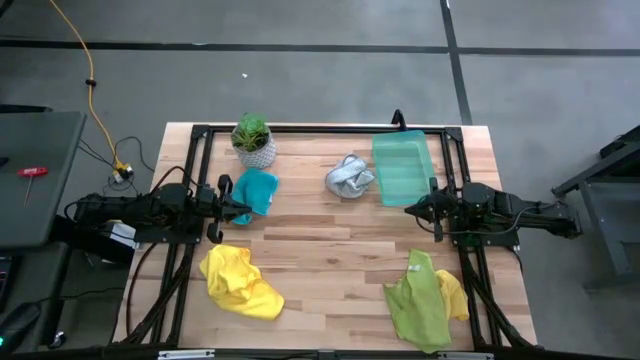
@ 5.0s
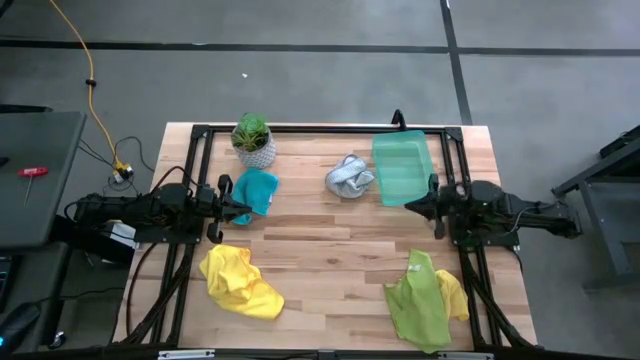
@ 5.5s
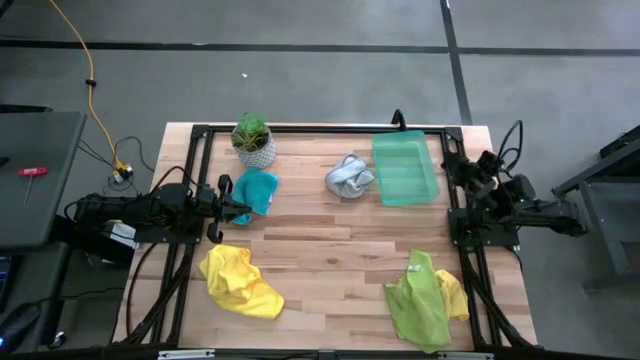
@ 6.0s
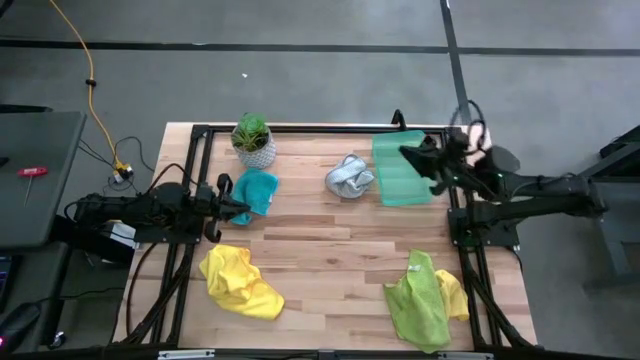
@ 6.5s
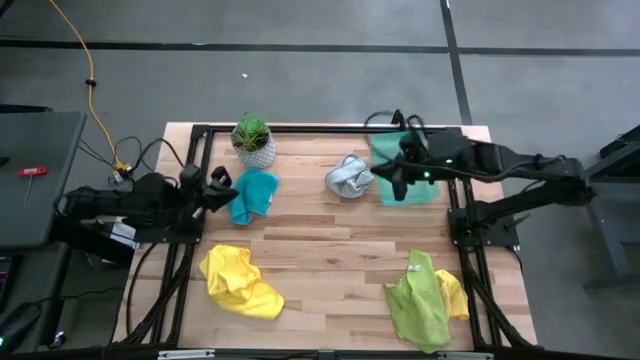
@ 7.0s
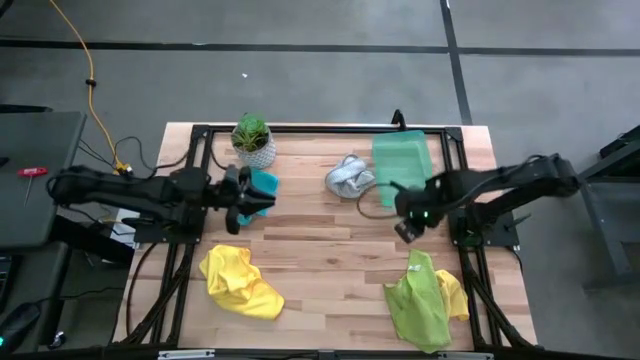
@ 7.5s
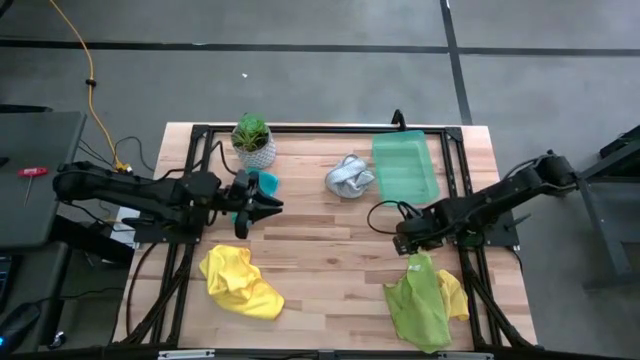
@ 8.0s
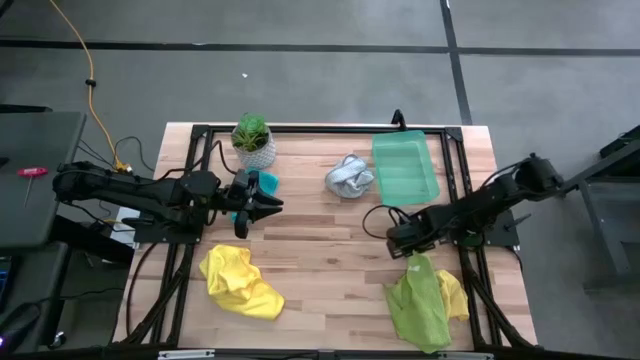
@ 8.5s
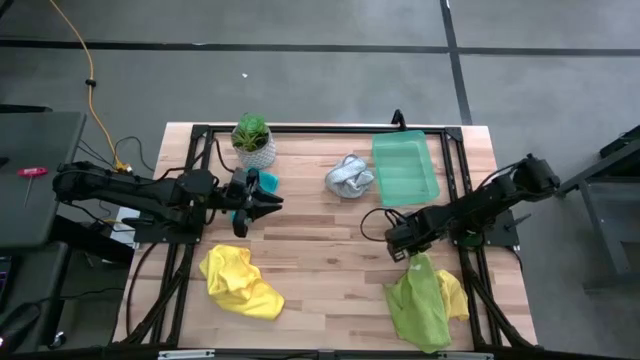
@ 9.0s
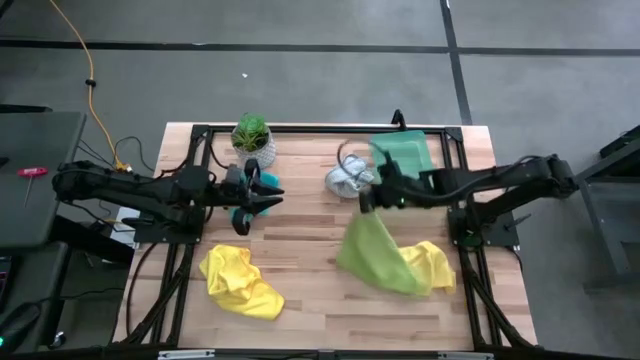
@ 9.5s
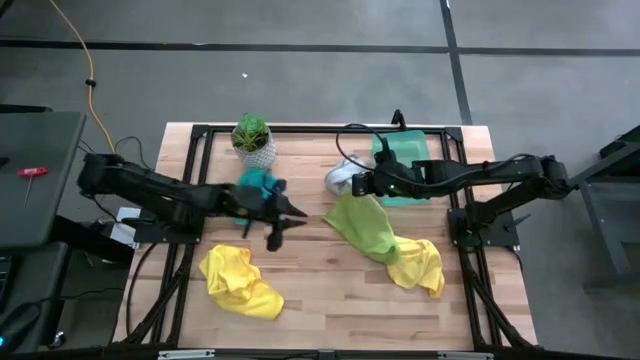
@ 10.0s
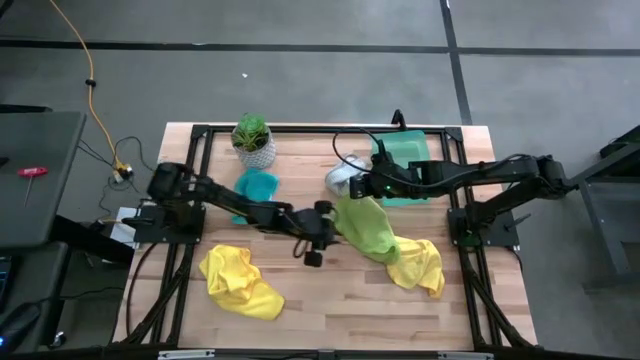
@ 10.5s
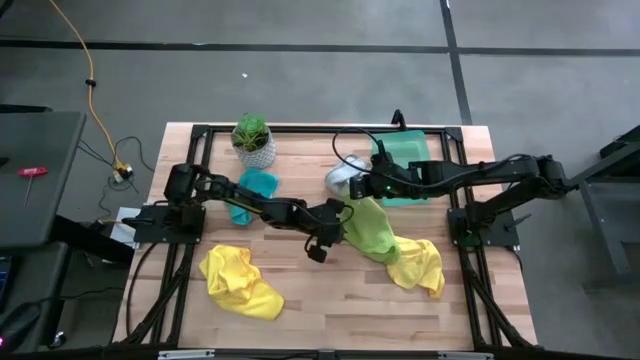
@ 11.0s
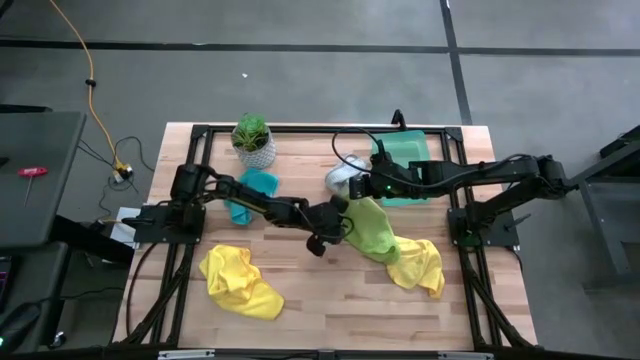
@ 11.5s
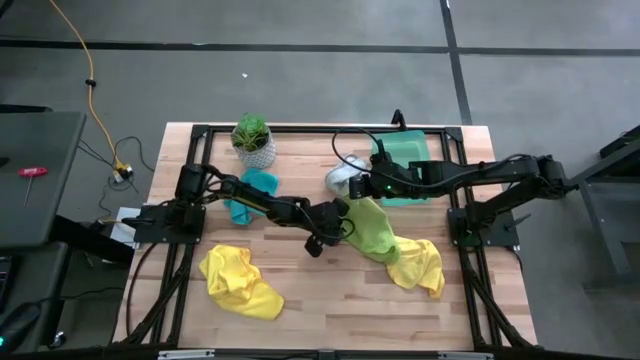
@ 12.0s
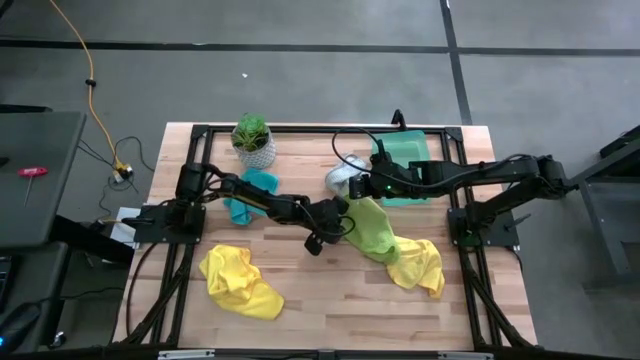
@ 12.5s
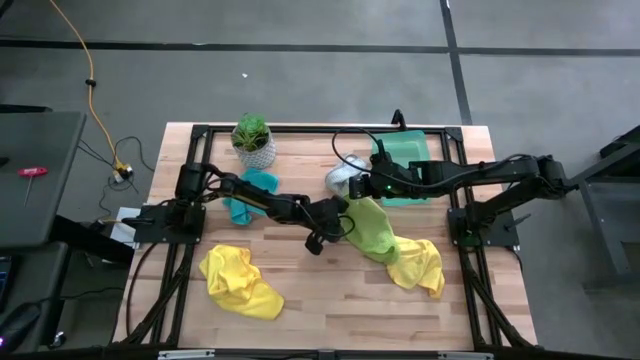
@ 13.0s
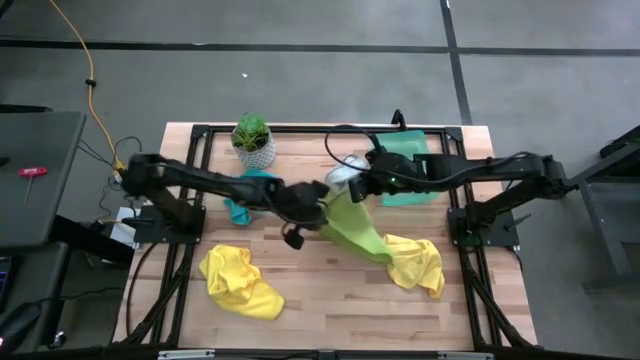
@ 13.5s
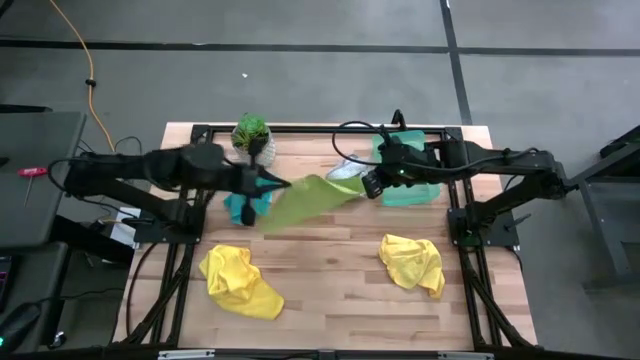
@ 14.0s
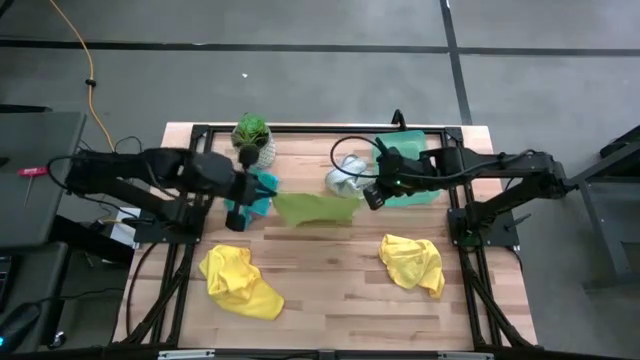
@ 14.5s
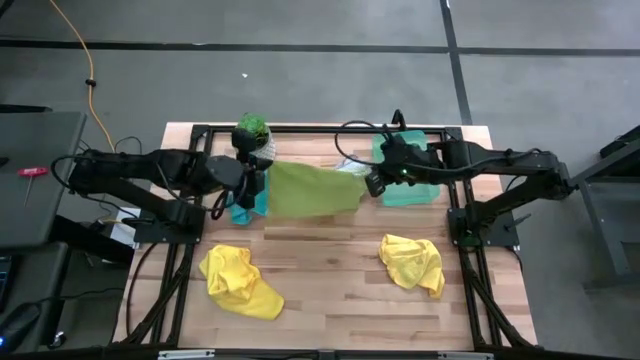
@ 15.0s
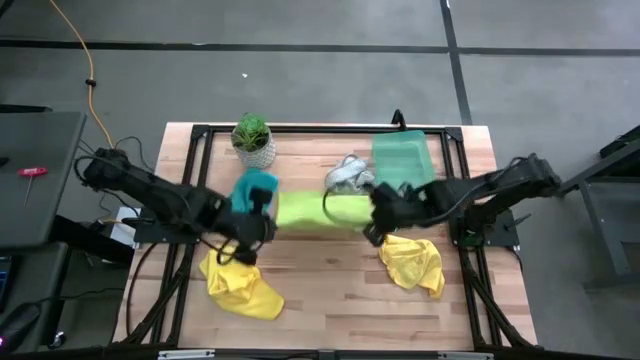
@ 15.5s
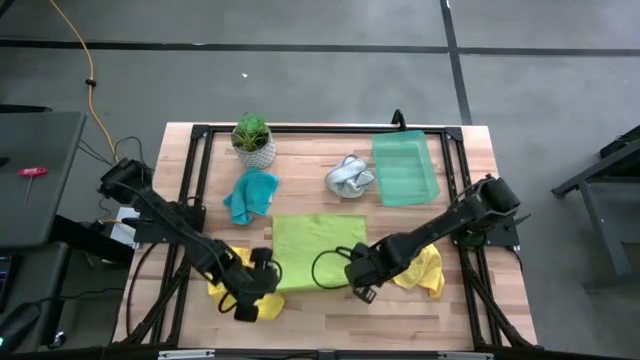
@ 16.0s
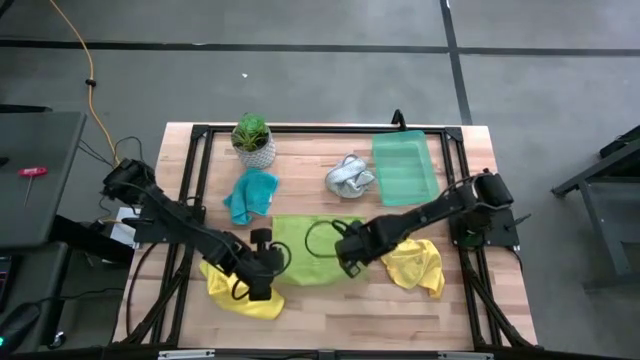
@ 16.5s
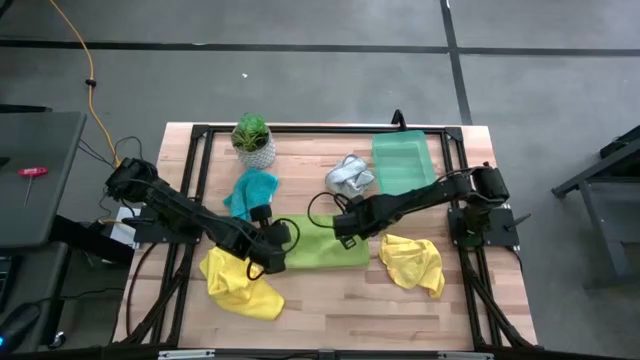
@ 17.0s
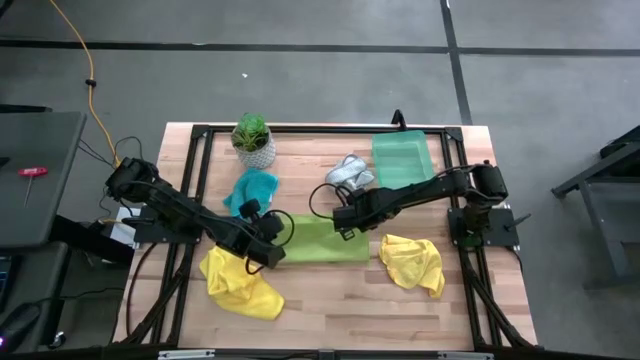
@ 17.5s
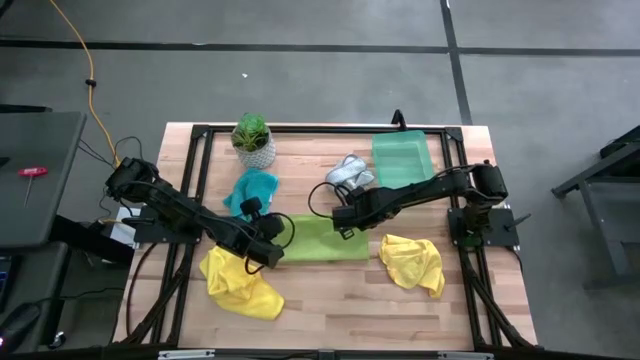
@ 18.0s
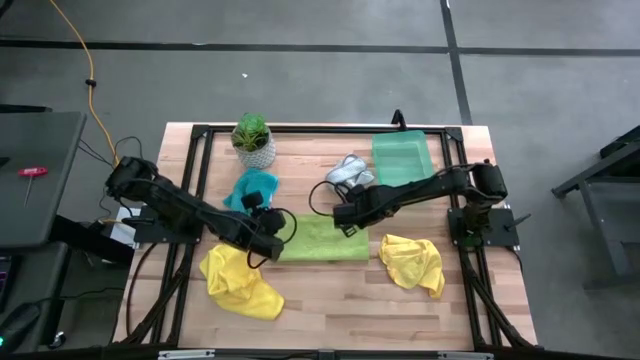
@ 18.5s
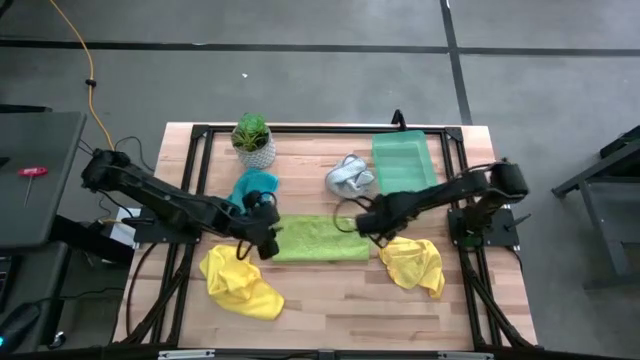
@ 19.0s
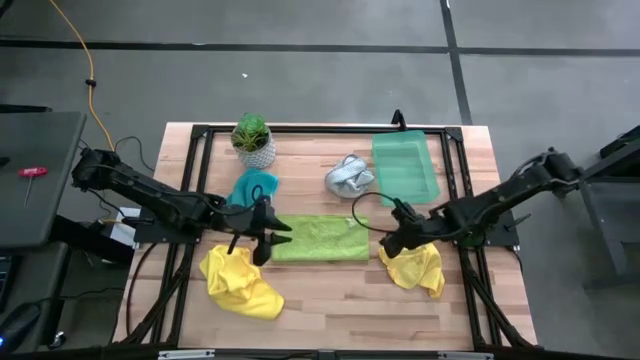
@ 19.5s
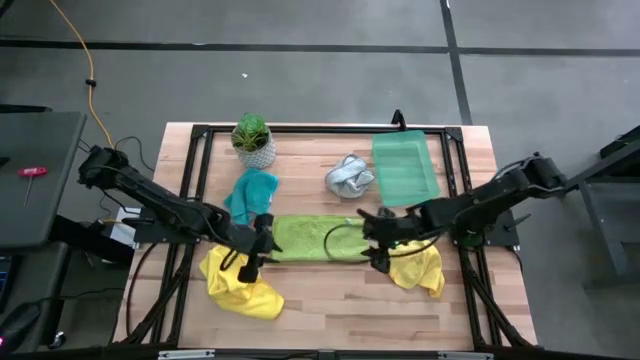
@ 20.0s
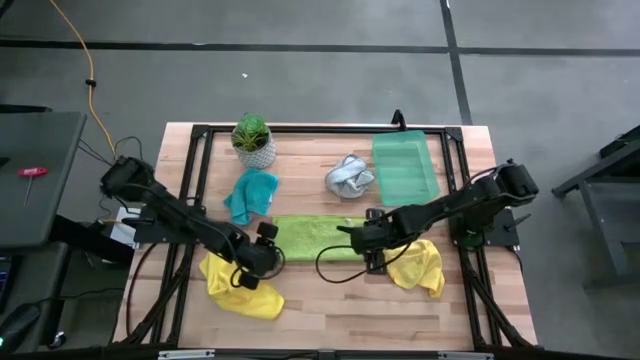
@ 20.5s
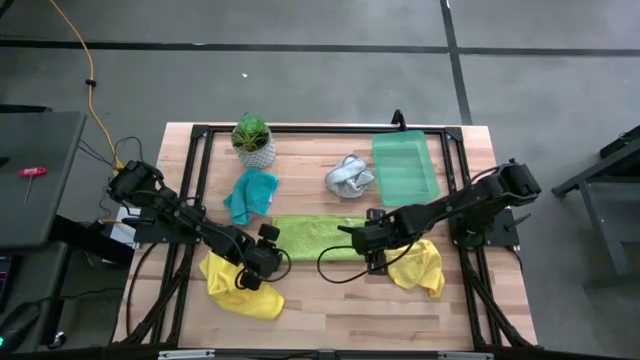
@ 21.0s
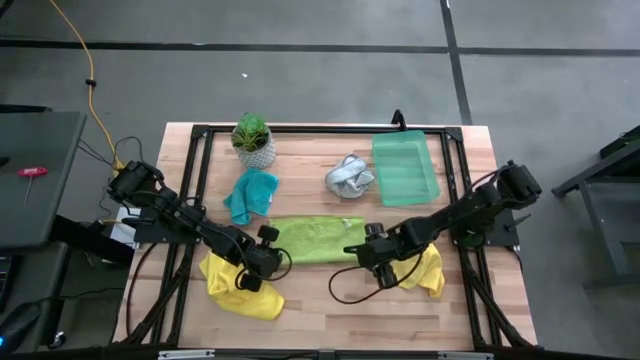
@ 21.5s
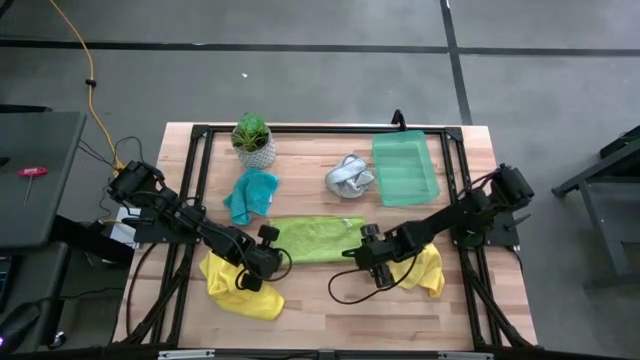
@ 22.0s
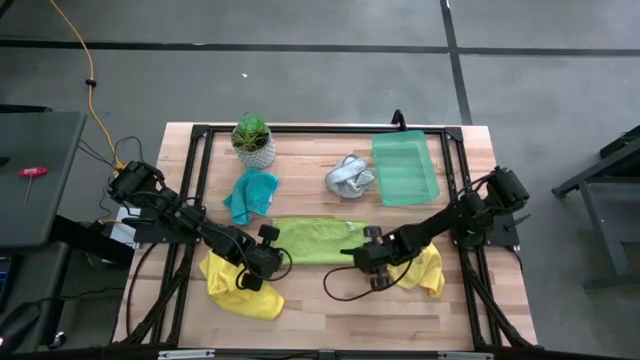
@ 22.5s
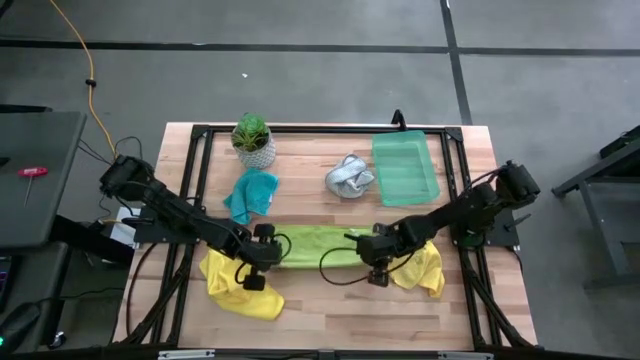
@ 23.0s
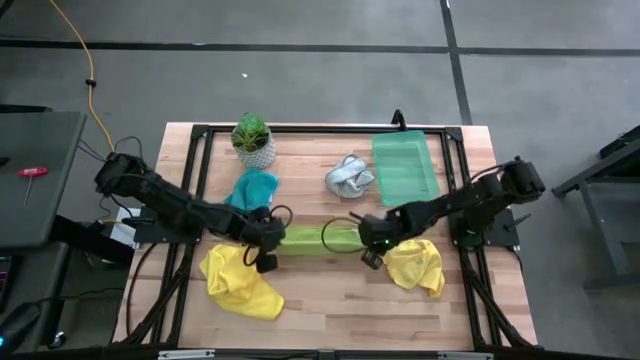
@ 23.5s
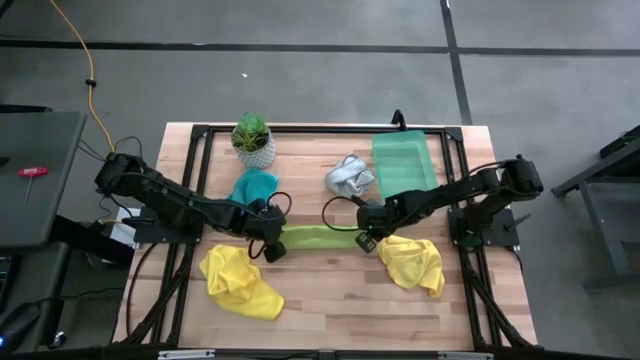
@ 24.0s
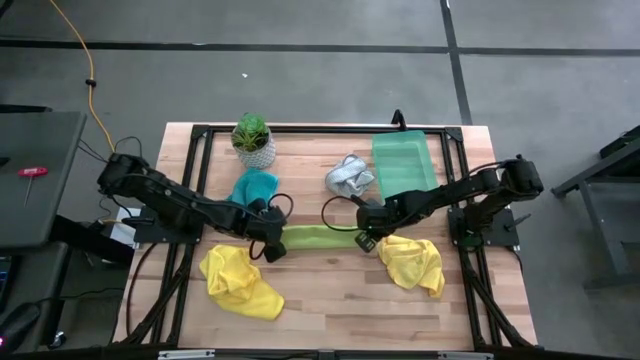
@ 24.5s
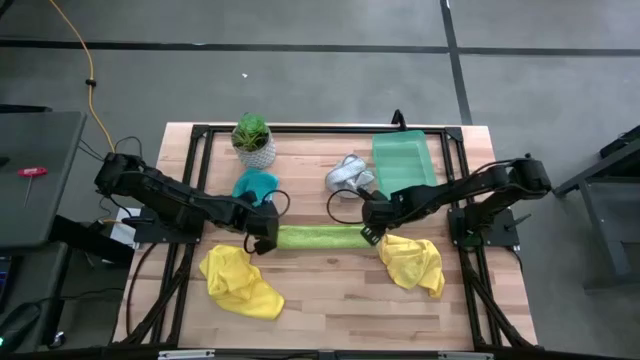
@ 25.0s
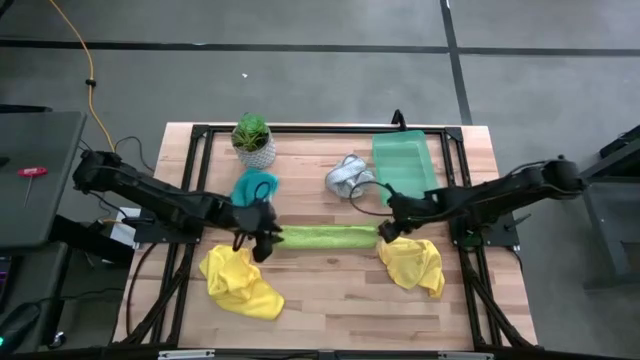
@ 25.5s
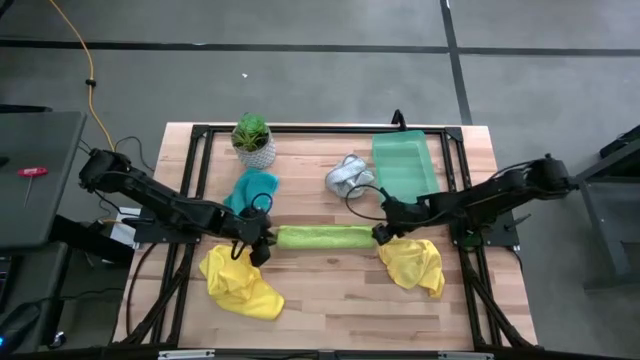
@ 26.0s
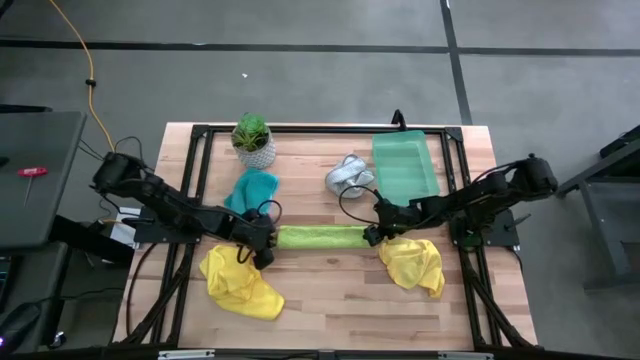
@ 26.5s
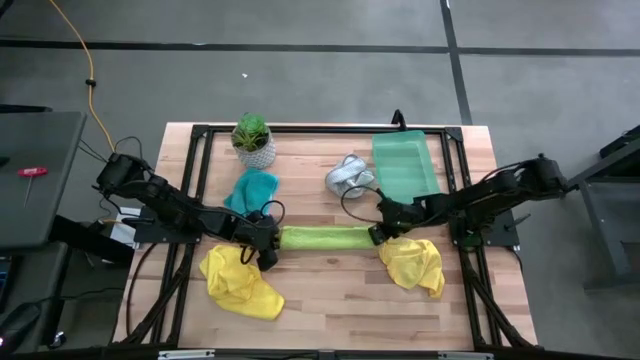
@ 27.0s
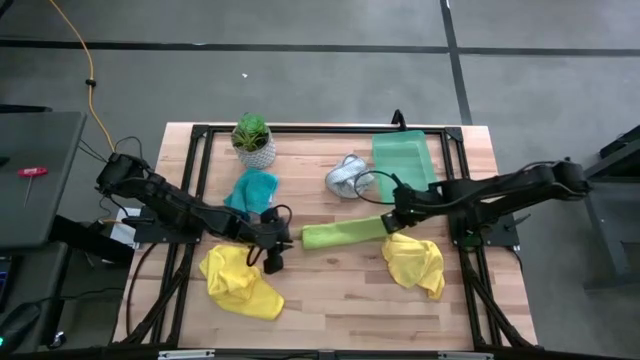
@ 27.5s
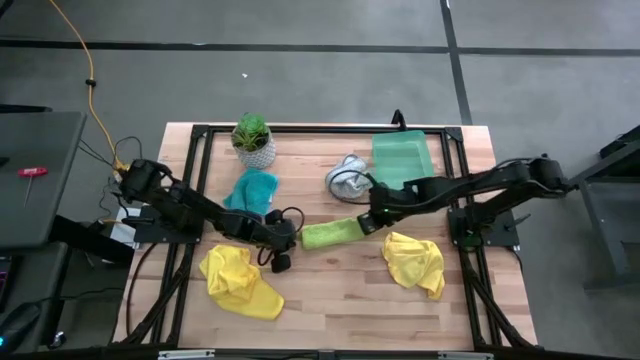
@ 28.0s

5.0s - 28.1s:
Task: Fold microfiber towels
Fold the green microfiber cloth
